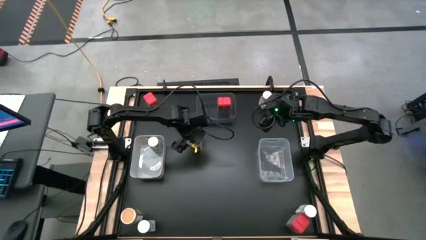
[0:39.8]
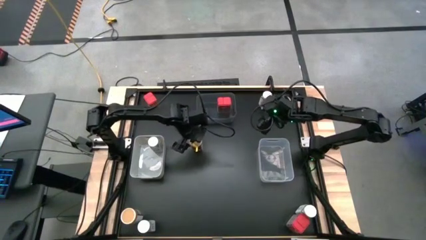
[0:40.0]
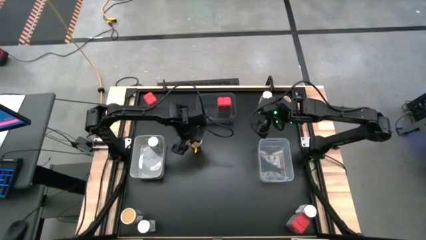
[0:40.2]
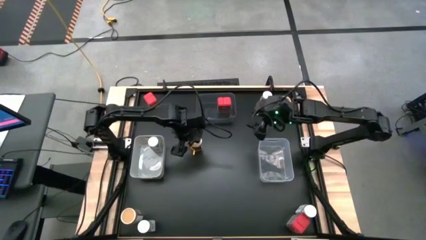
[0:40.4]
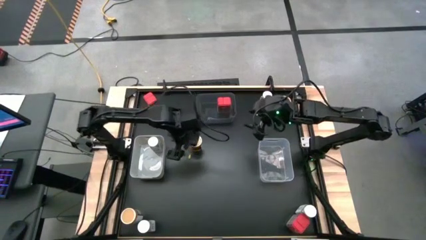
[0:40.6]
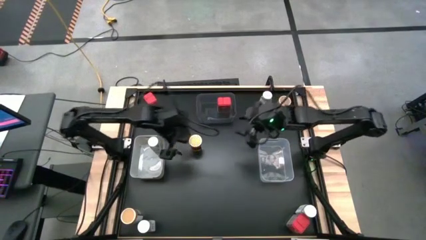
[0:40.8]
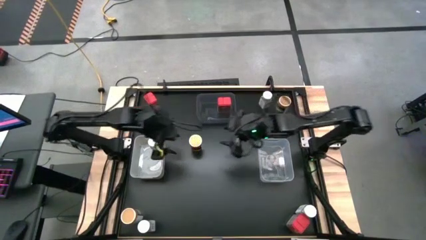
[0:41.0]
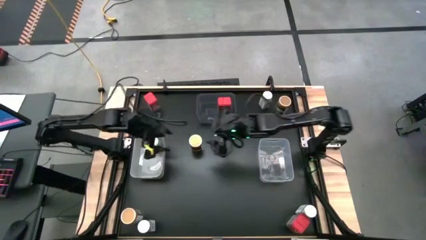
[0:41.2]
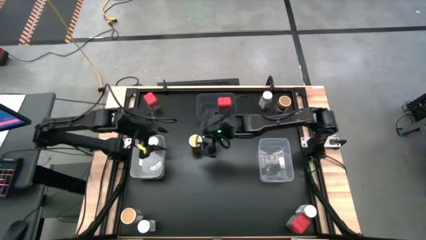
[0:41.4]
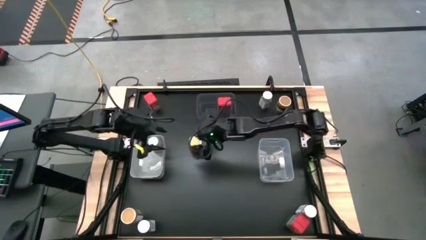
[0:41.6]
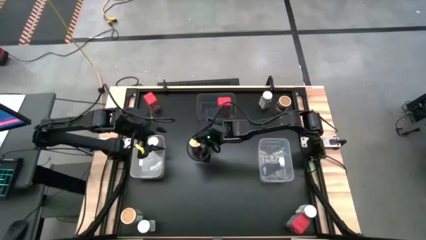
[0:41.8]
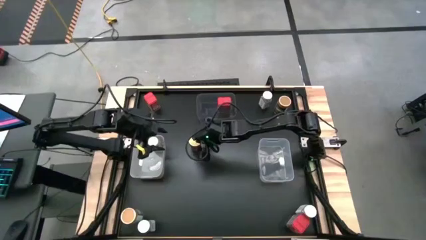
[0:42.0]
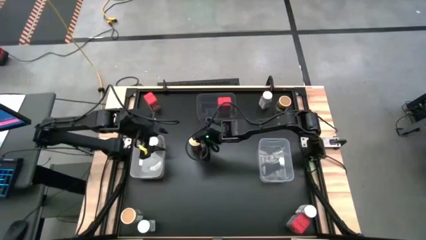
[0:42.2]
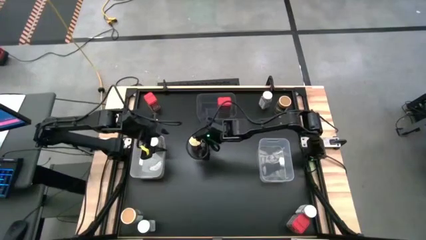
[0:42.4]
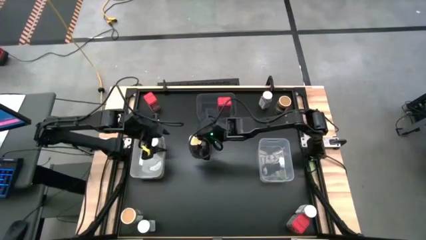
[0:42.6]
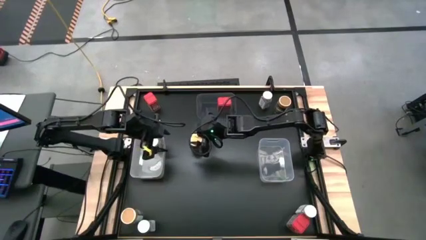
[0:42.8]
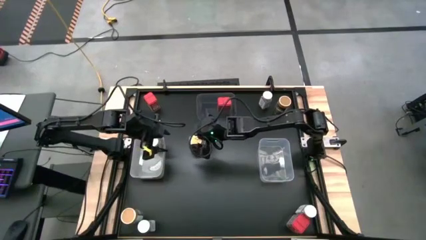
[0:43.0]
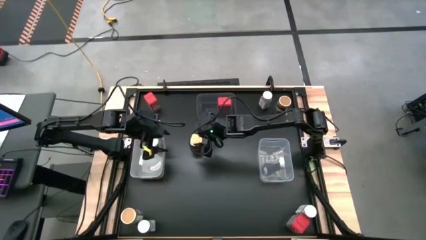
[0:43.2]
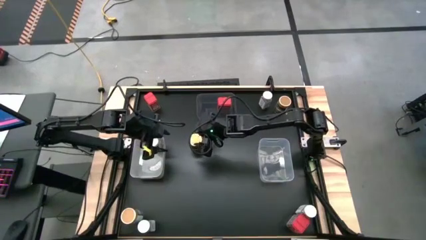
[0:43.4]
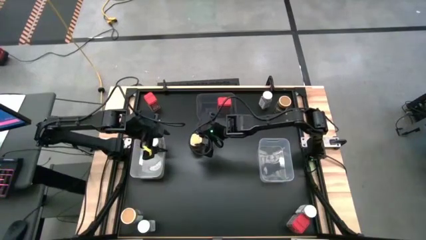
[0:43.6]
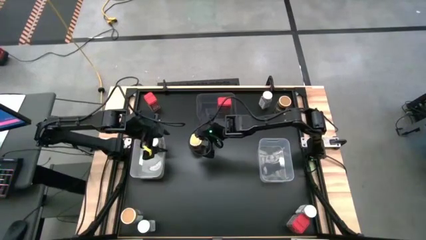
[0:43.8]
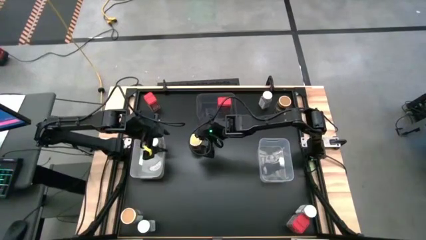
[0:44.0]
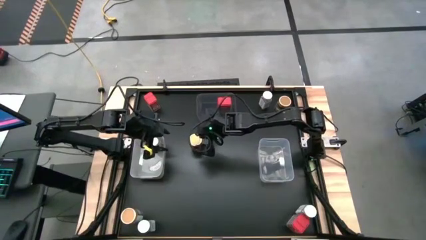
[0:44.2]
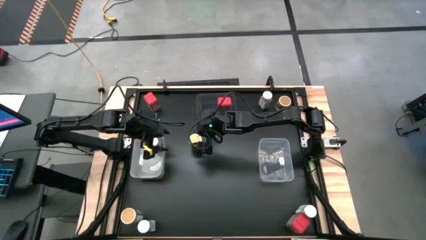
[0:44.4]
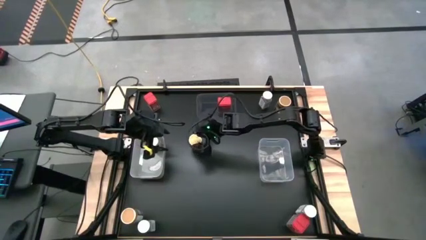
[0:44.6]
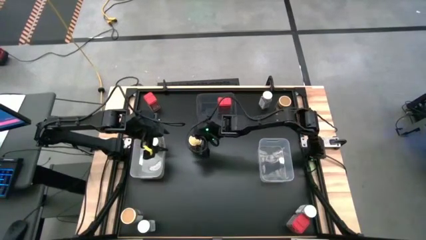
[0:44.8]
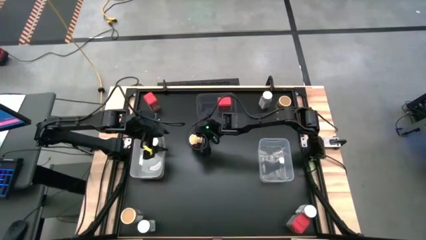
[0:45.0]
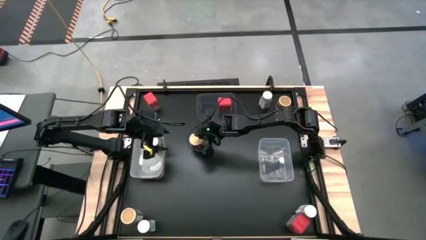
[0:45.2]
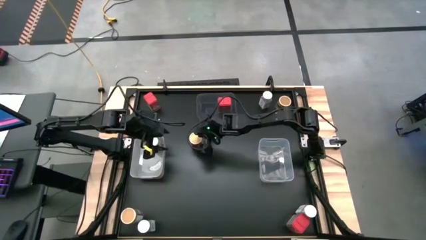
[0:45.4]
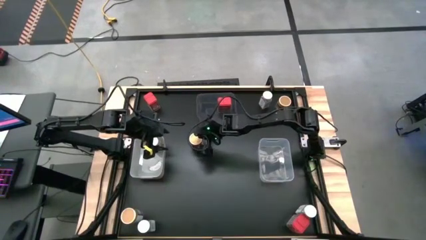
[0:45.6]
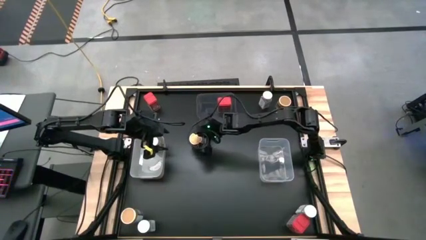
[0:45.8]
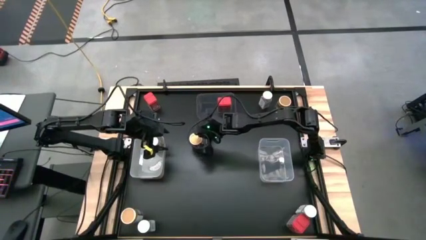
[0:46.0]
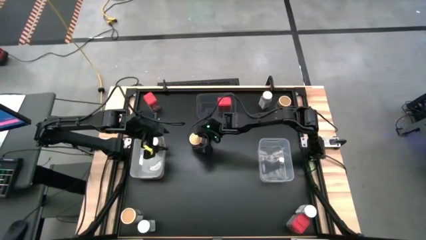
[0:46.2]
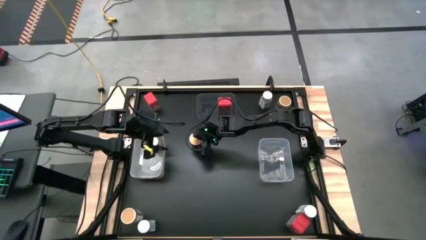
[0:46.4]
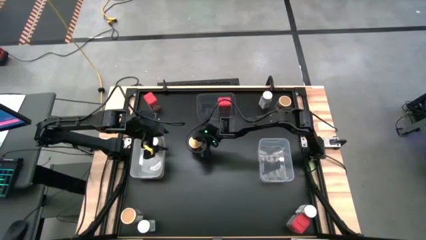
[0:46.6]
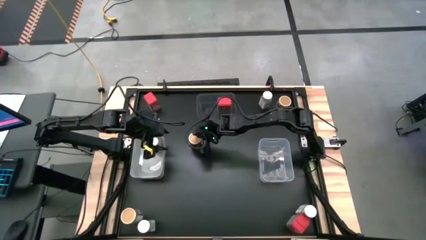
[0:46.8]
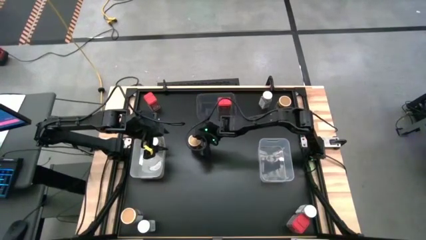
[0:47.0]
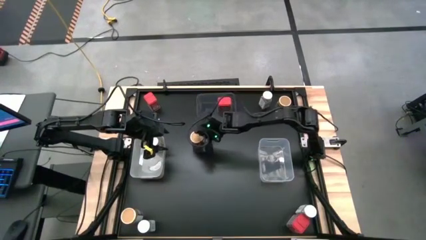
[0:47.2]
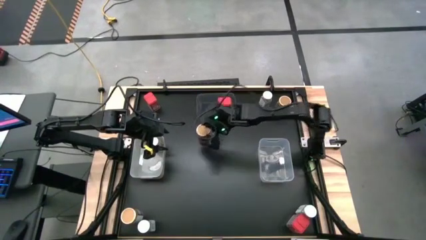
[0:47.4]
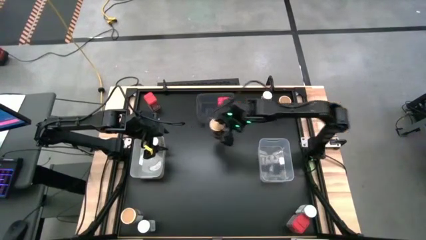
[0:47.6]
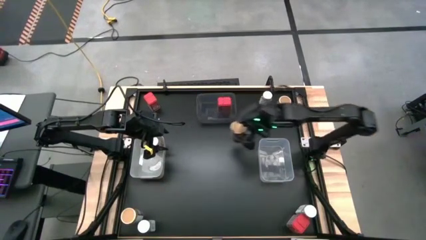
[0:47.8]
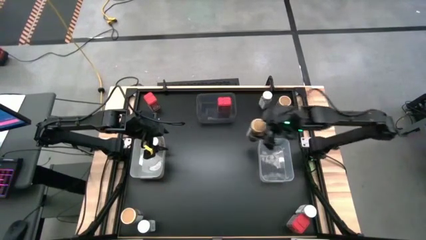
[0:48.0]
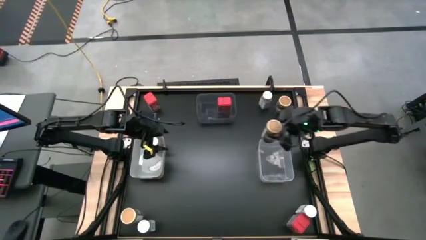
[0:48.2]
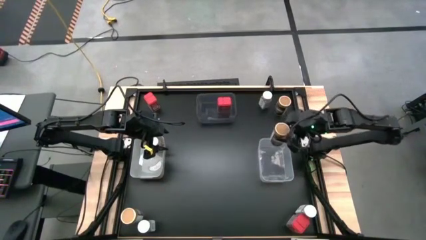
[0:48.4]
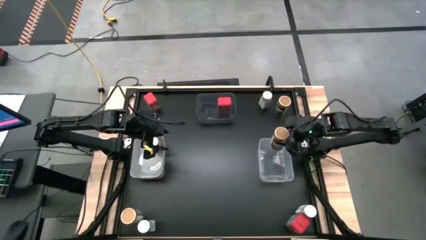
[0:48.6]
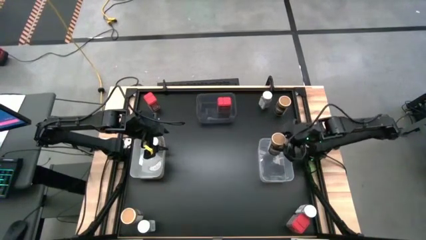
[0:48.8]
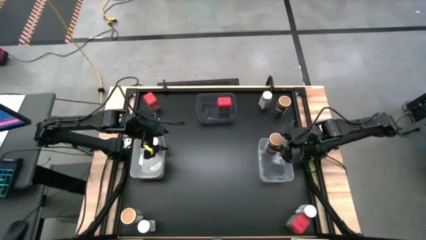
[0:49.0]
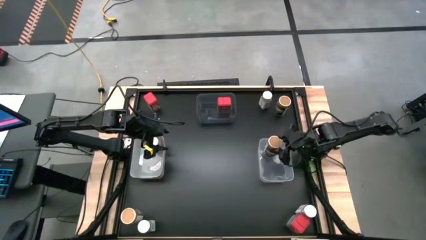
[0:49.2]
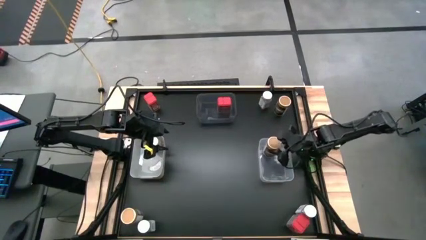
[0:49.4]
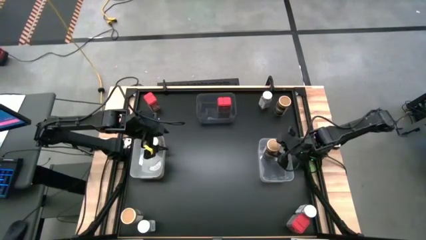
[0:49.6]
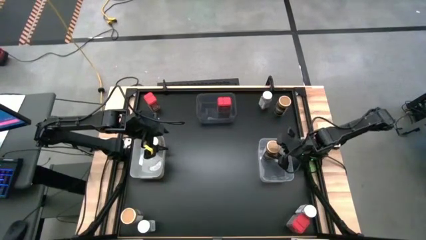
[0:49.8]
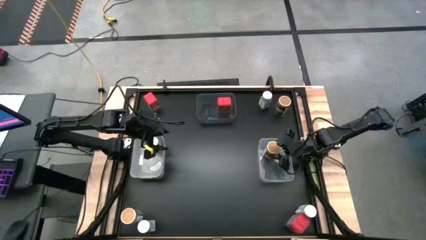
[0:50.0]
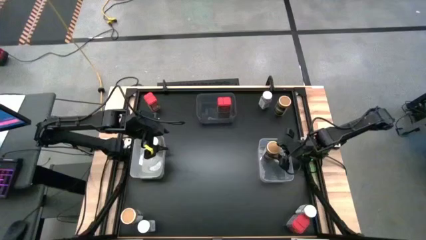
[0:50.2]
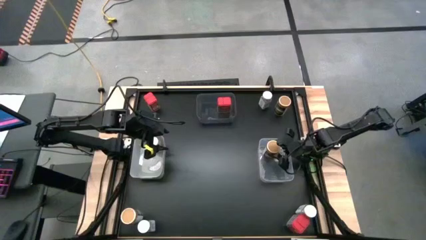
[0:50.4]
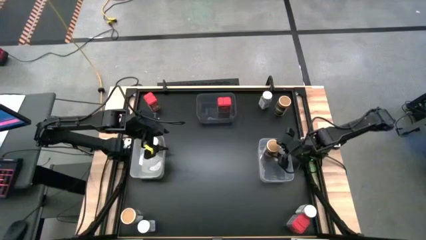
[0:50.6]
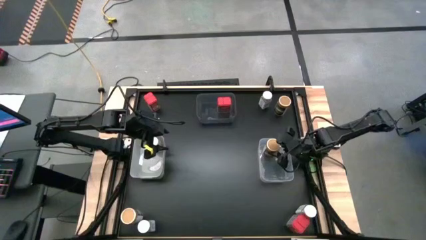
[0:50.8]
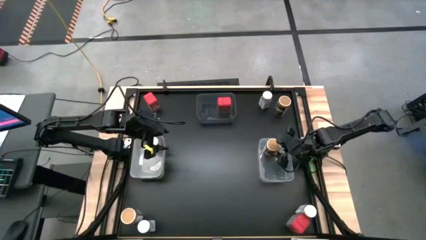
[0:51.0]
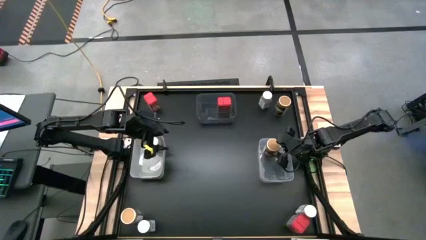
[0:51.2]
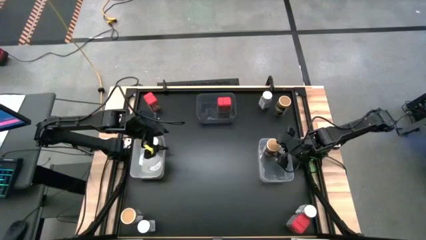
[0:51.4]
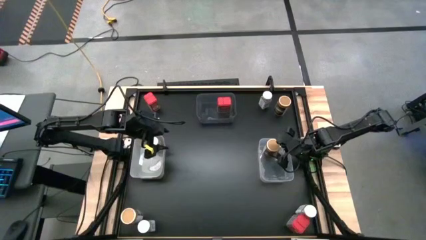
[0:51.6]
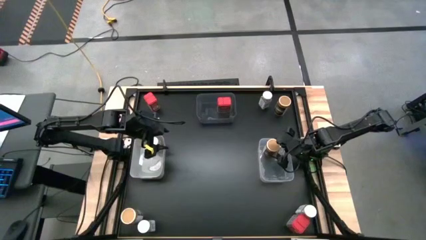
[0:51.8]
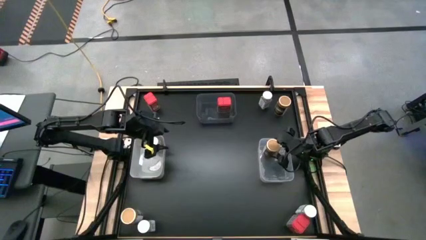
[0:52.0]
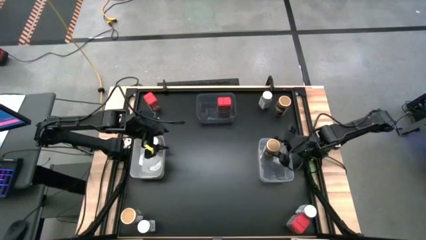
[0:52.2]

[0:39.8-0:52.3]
Task: Sort spices by type
Put the top left gold seasoning bottle into the transparent bin
